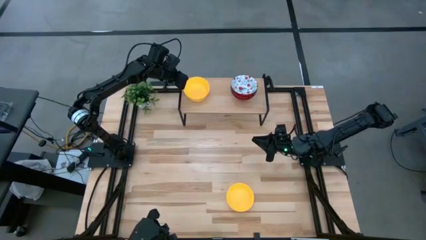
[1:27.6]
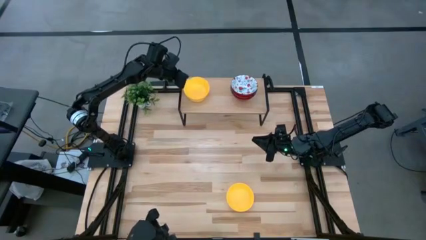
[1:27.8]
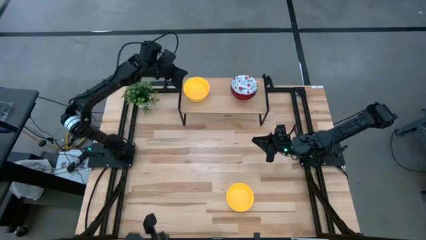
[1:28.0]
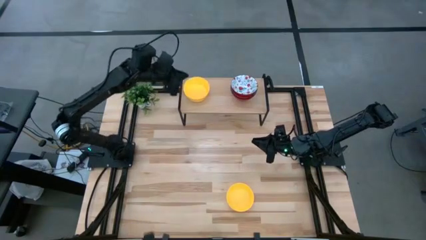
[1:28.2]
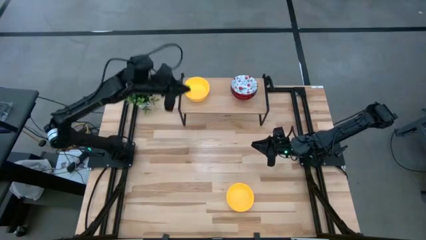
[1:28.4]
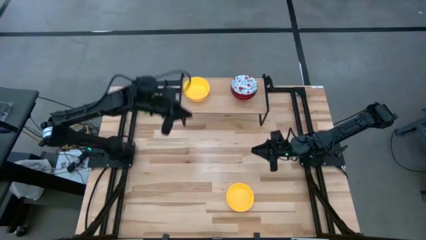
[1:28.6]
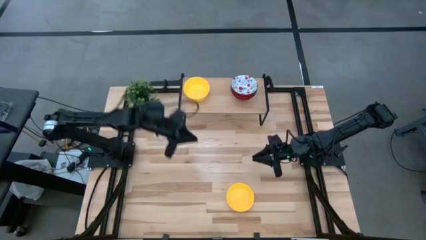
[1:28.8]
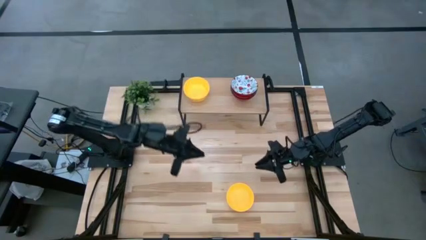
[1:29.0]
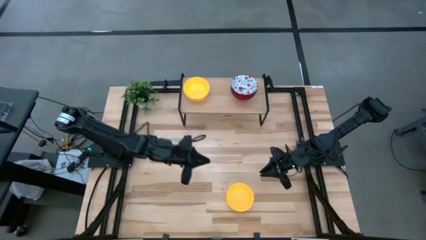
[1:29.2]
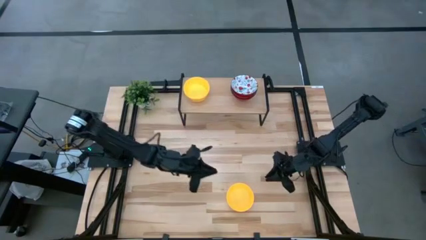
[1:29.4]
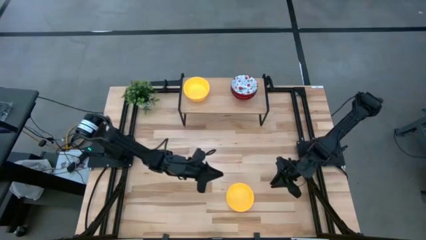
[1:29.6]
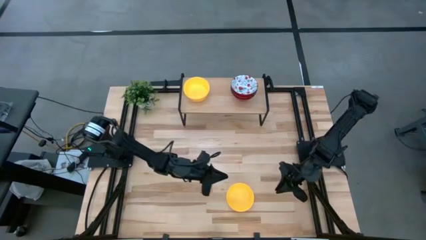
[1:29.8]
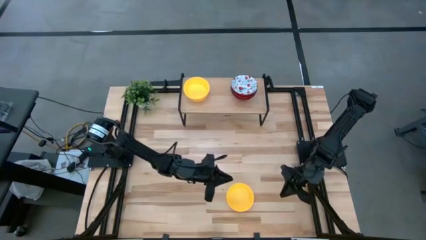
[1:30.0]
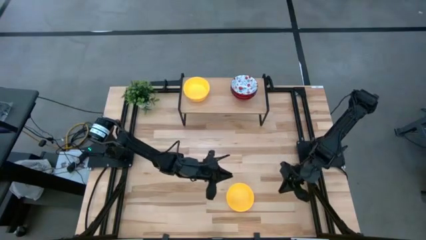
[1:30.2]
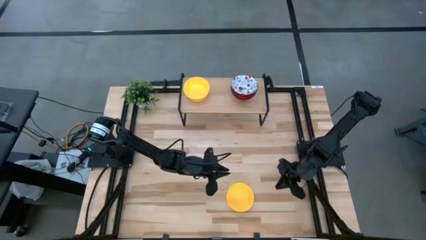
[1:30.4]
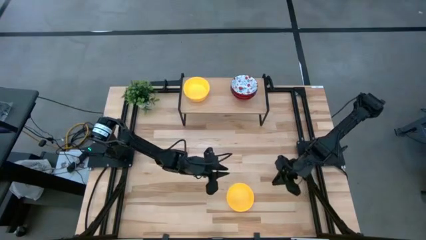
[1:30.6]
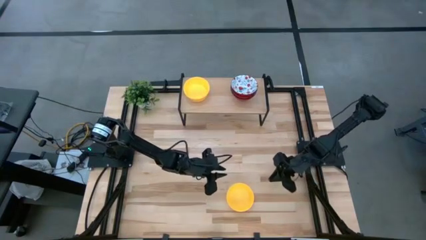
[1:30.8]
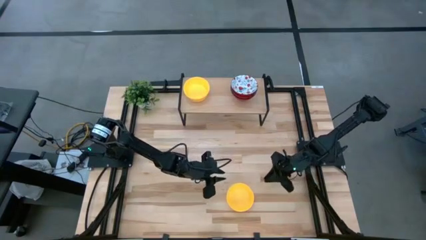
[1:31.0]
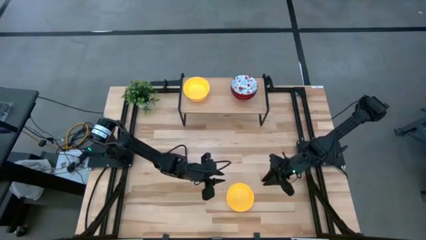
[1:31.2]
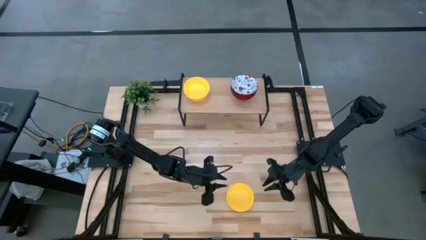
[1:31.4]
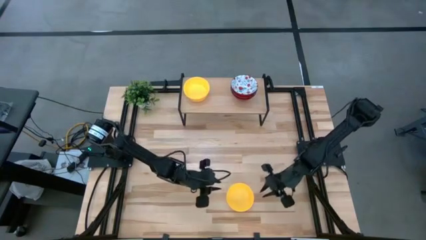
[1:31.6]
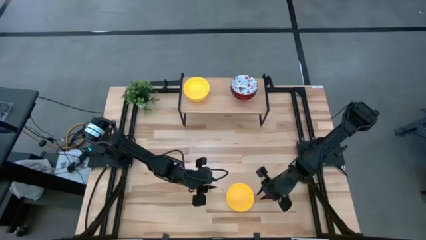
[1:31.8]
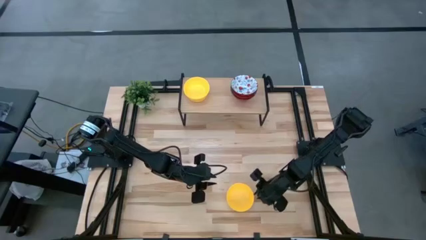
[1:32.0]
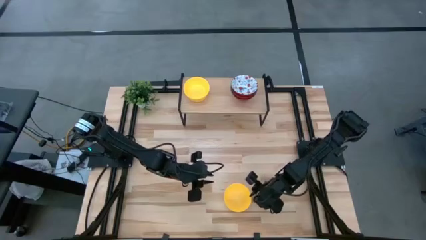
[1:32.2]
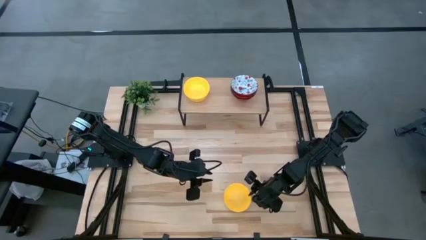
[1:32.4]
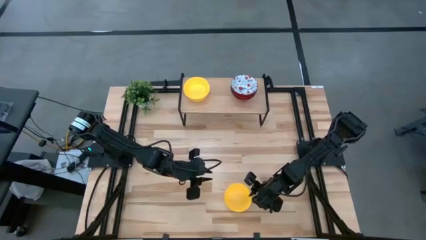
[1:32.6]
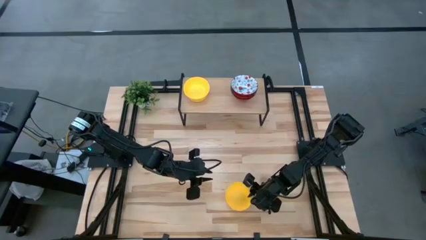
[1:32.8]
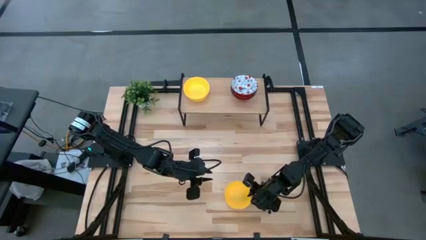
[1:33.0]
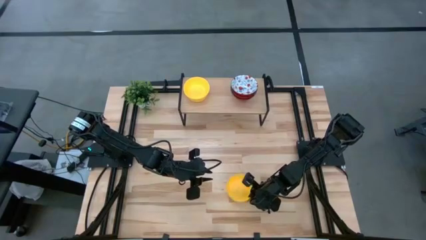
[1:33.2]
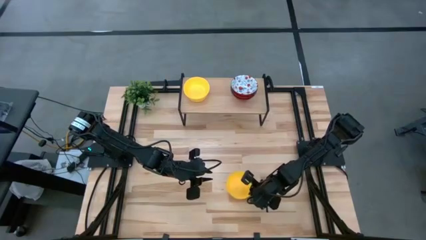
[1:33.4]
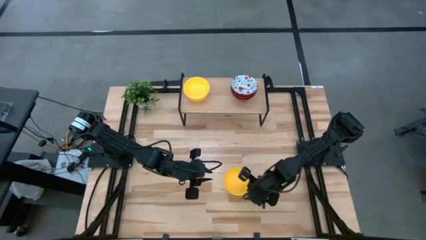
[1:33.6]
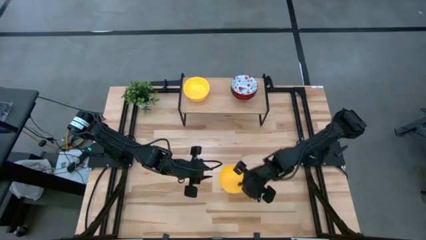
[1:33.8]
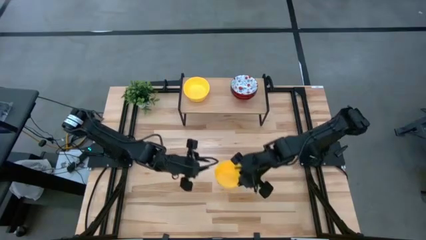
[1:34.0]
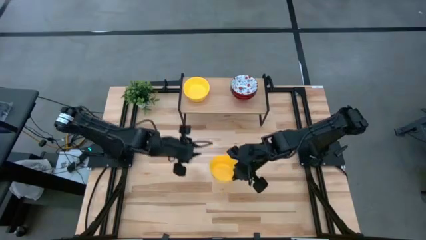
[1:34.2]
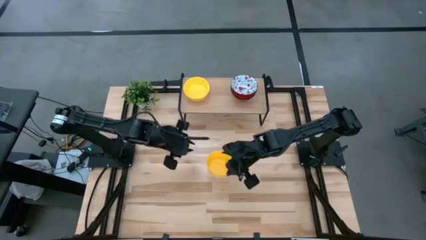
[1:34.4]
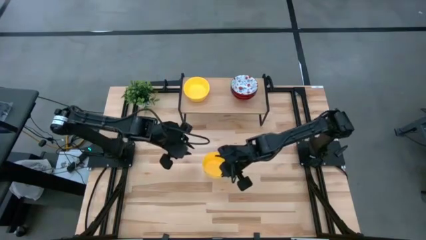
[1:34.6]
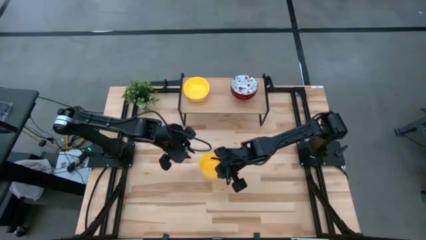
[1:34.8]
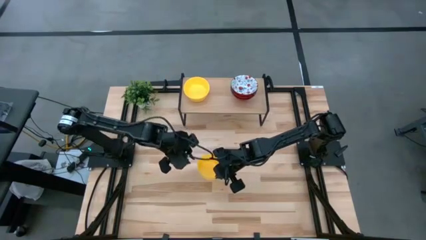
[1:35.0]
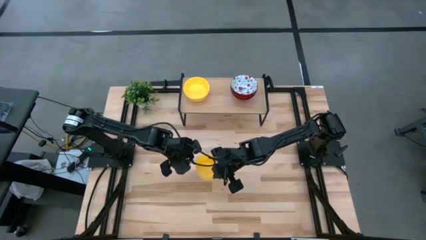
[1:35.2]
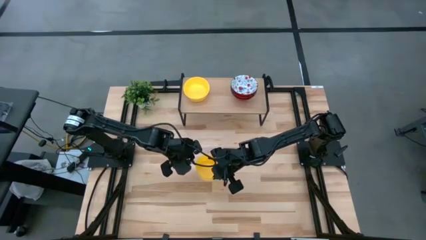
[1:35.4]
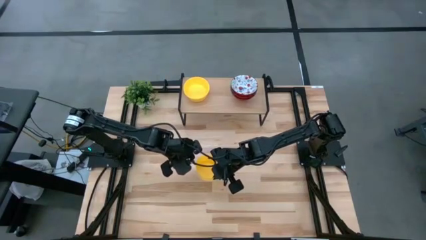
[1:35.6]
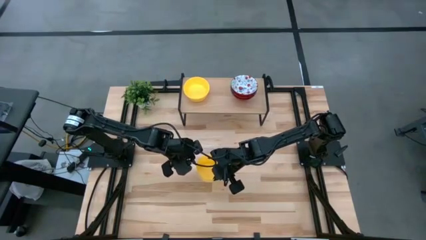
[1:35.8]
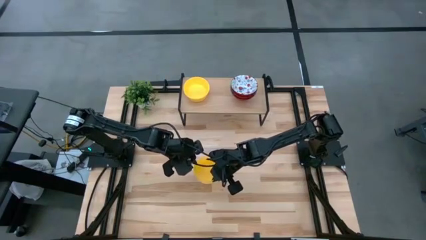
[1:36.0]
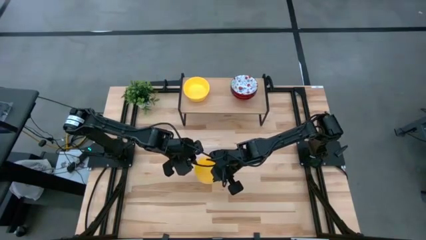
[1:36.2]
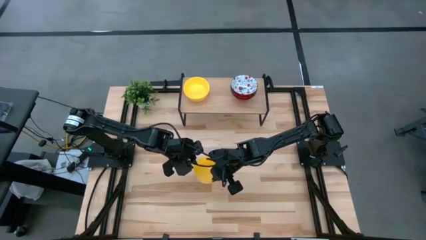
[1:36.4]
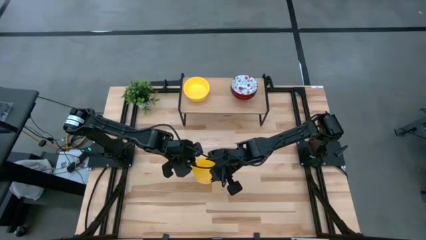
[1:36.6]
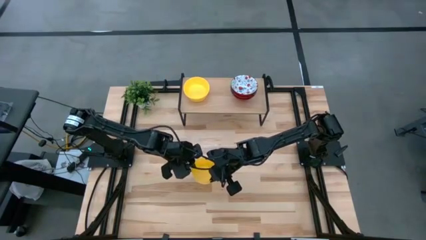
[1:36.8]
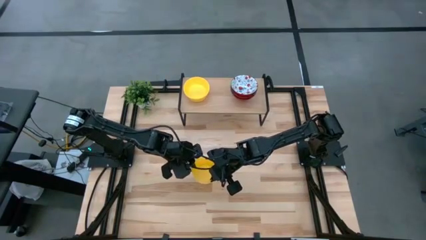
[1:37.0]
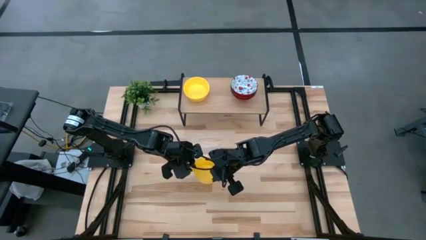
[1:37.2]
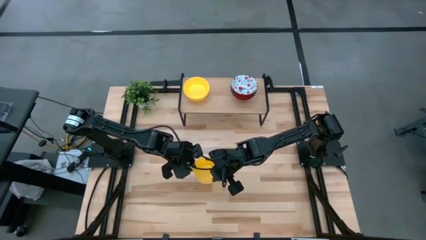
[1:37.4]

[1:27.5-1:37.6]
Task: Pick & Place Mini bowls
Stack the yellow bowl on top of the yellow bowls on the shelf

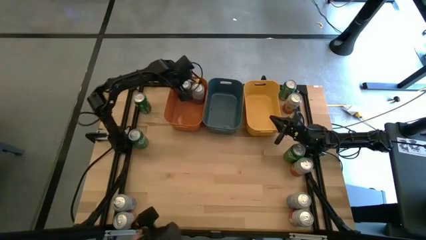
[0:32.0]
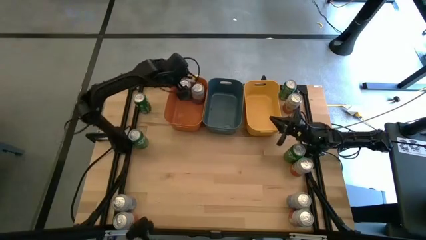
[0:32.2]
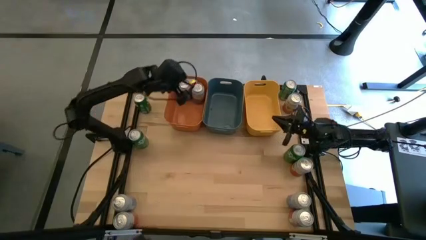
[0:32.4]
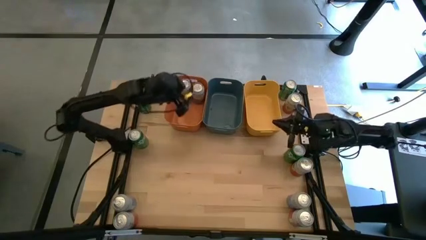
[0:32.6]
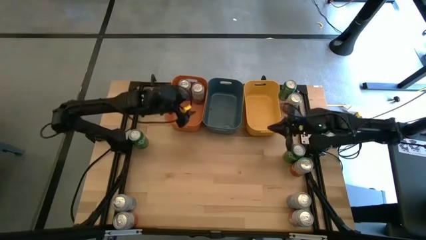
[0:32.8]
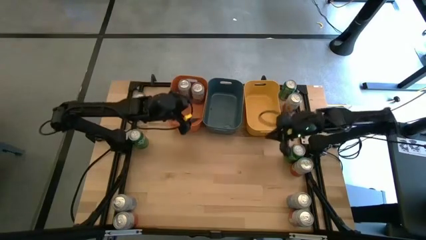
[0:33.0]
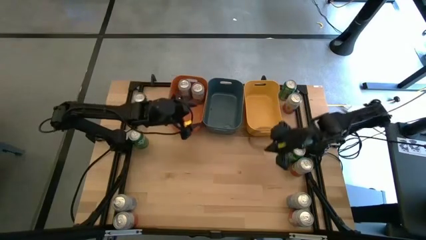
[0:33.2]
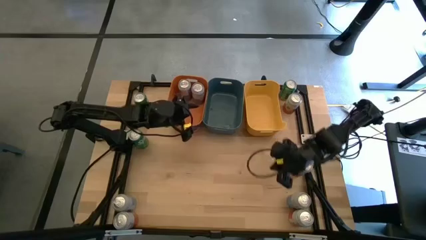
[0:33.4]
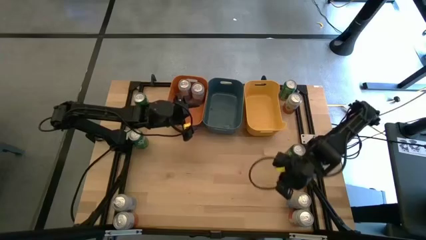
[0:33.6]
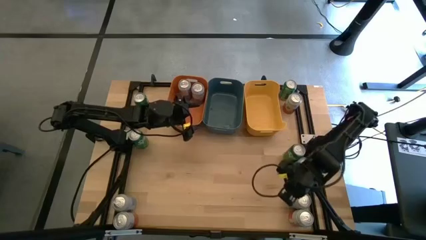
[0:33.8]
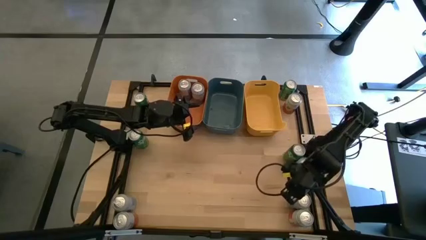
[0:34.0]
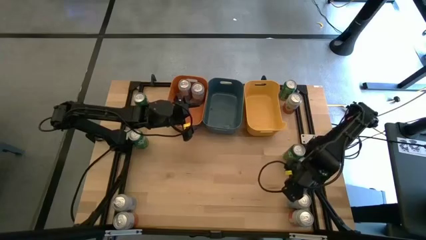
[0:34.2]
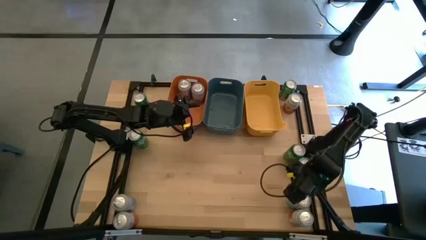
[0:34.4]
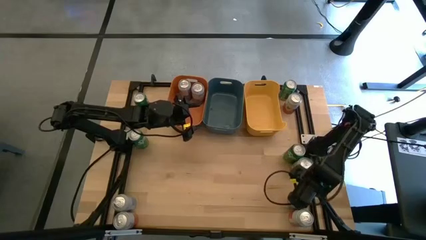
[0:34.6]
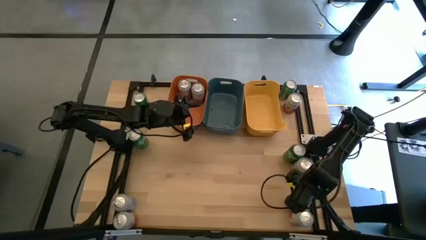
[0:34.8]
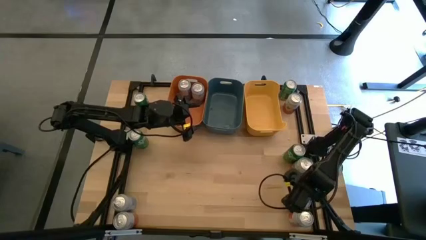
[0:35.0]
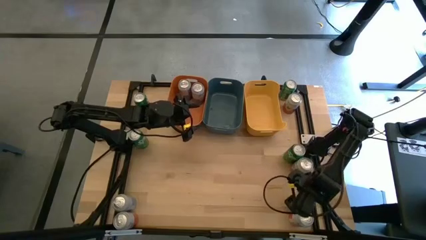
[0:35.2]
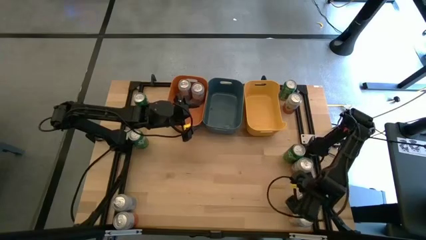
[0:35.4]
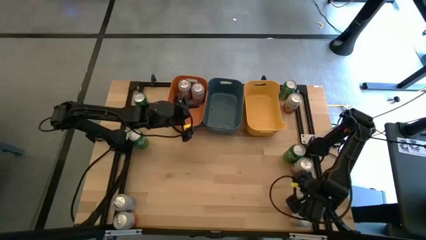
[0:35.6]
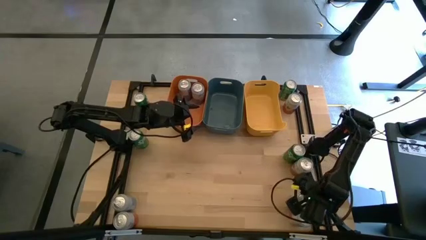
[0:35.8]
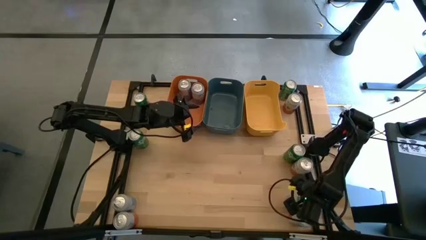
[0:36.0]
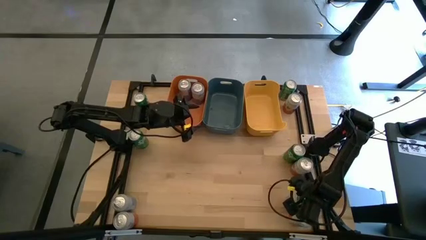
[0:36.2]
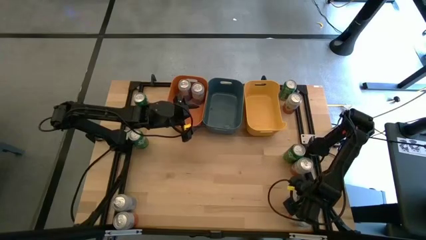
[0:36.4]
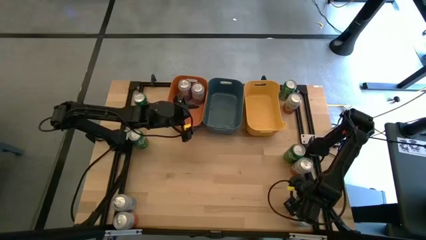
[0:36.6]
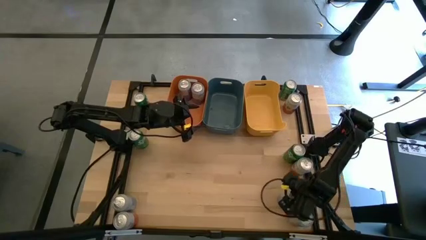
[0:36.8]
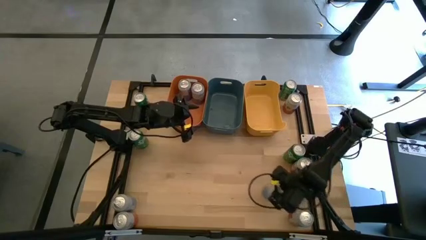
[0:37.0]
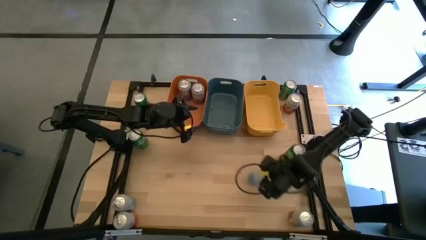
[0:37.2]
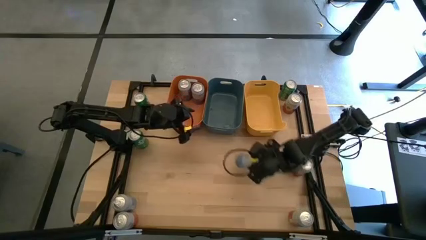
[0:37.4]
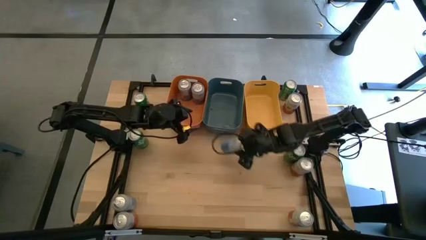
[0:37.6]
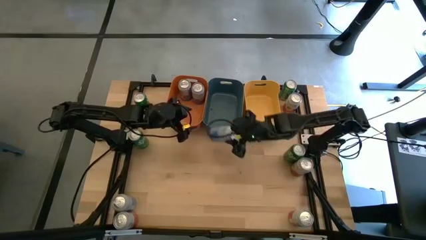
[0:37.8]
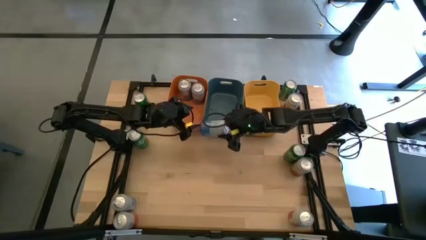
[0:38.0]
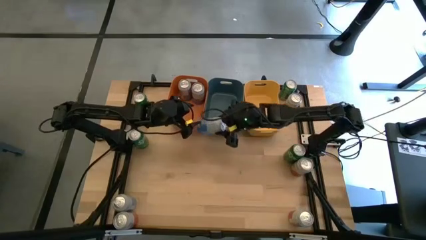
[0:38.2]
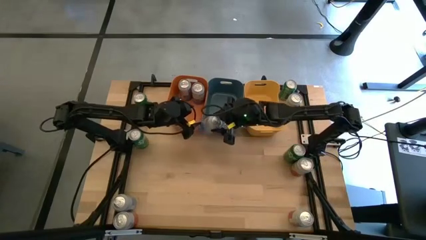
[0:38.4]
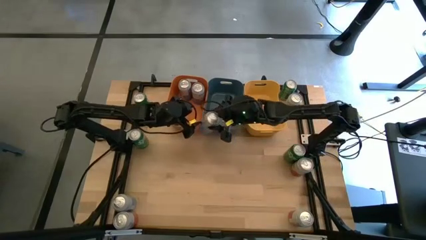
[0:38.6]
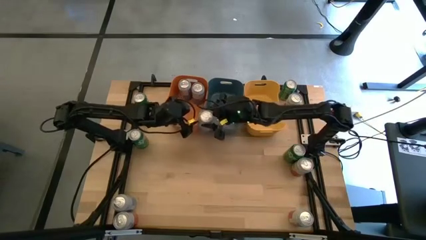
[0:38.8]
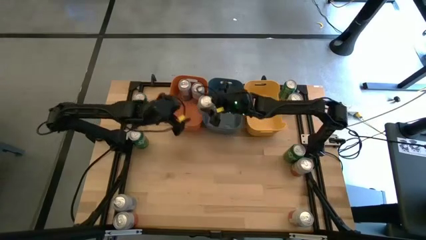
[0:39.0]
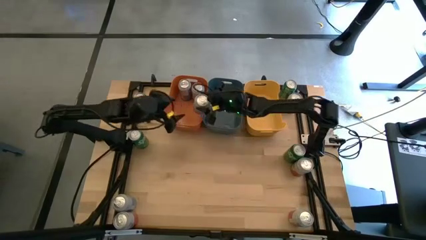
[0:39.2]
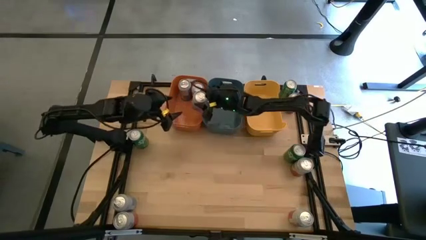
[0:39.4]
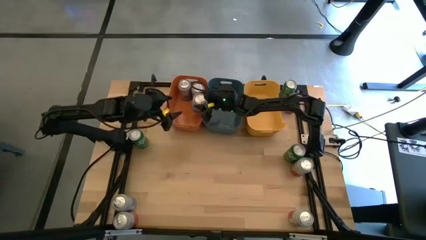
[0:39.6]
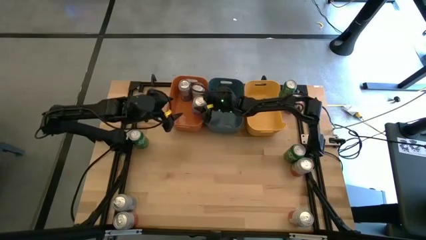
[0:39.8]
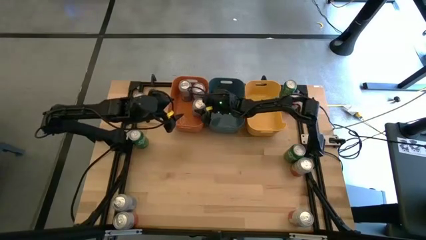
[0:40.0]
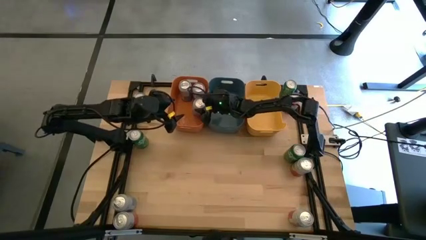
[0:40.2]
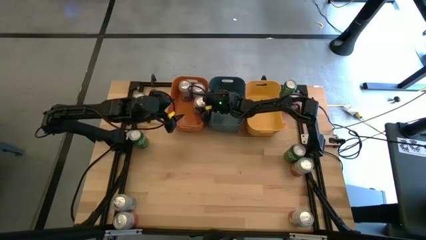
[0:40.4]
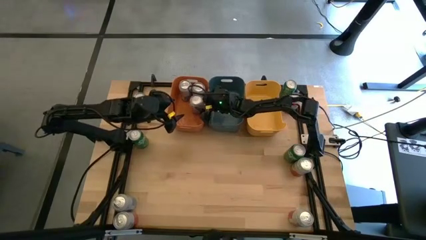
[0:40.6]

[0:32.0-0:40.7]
Task: Sort soda cans
Put the right blue-white soda can into the orange bin
